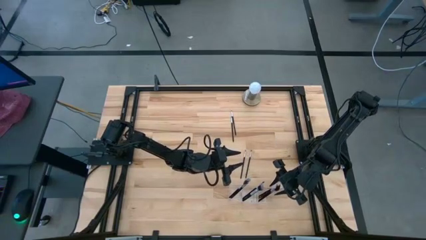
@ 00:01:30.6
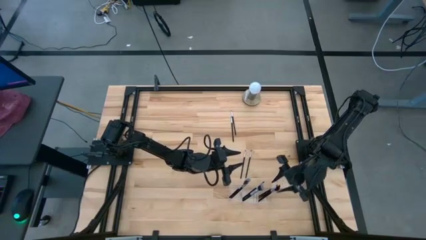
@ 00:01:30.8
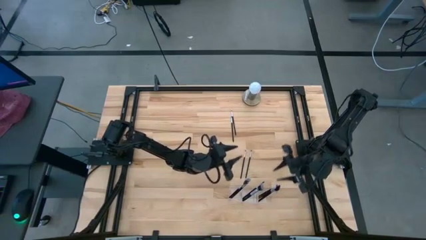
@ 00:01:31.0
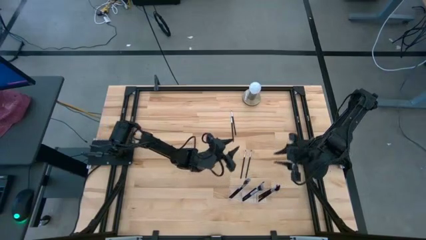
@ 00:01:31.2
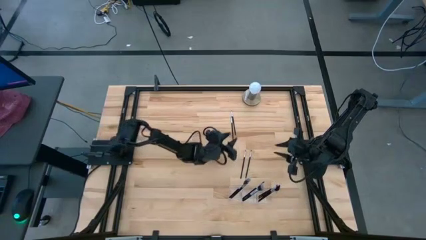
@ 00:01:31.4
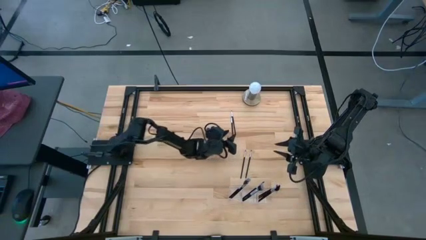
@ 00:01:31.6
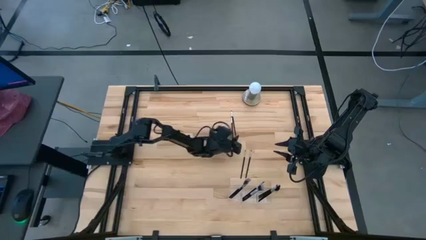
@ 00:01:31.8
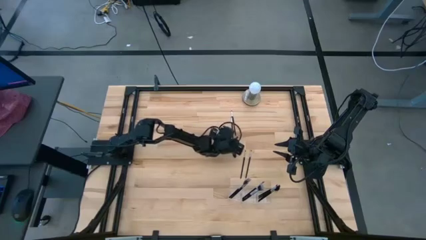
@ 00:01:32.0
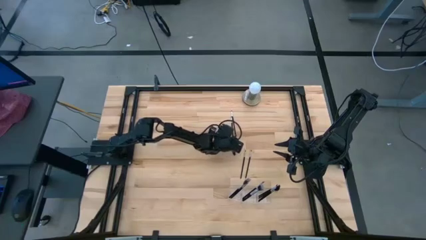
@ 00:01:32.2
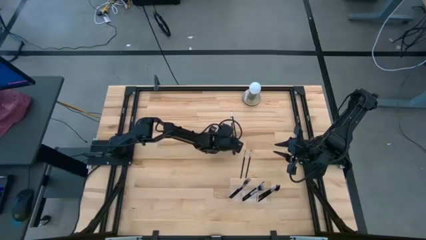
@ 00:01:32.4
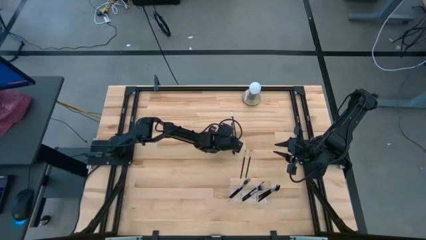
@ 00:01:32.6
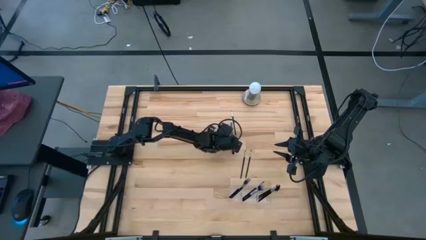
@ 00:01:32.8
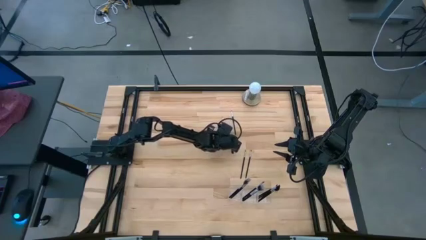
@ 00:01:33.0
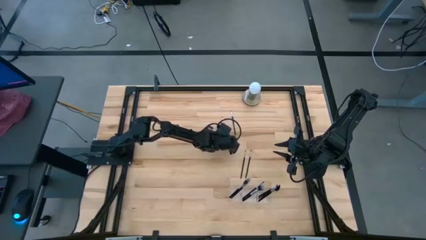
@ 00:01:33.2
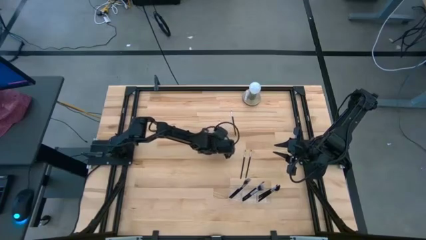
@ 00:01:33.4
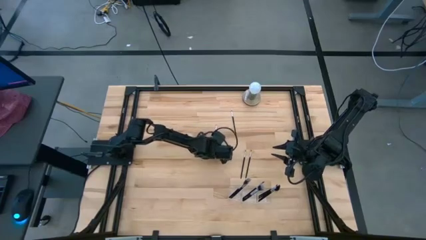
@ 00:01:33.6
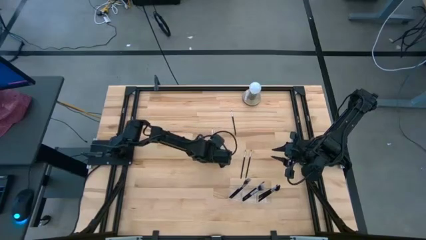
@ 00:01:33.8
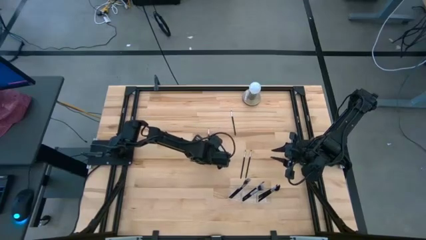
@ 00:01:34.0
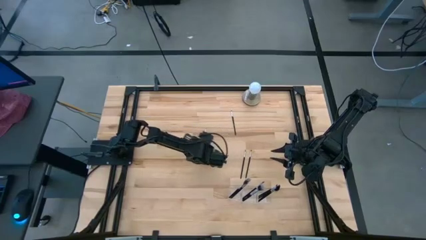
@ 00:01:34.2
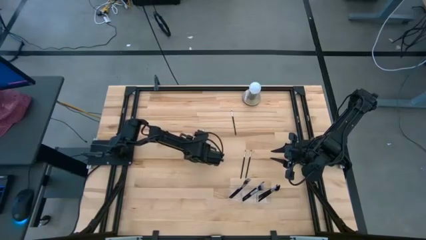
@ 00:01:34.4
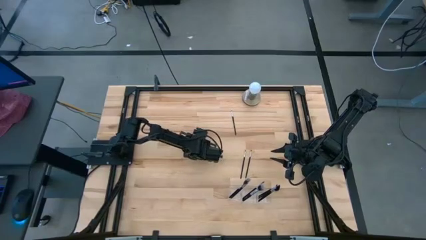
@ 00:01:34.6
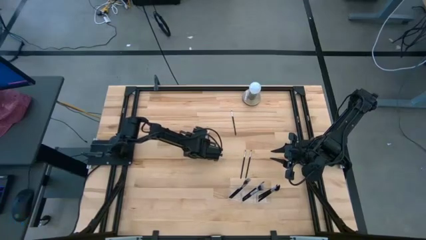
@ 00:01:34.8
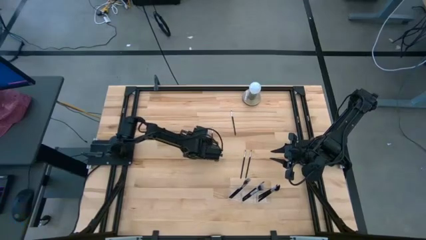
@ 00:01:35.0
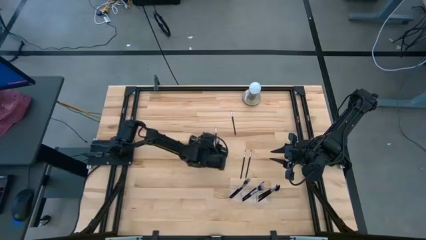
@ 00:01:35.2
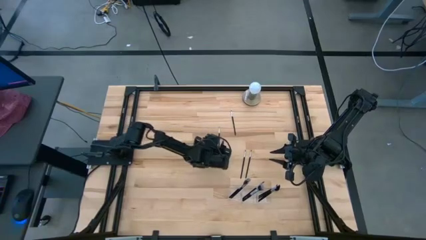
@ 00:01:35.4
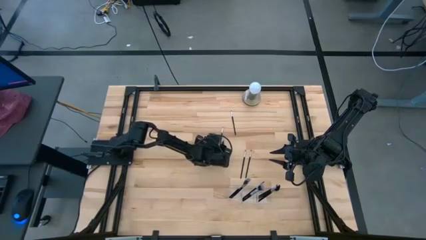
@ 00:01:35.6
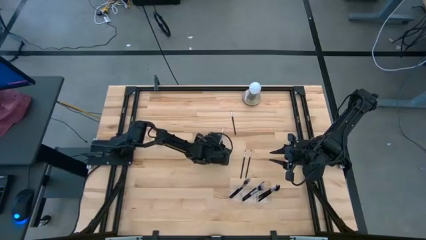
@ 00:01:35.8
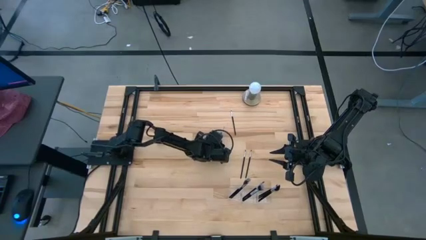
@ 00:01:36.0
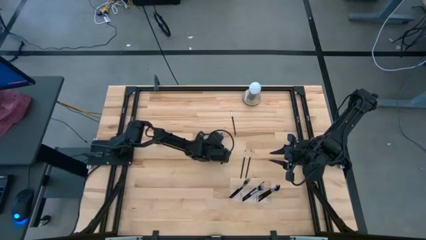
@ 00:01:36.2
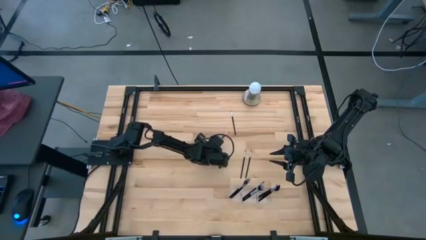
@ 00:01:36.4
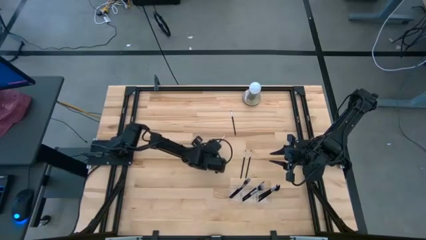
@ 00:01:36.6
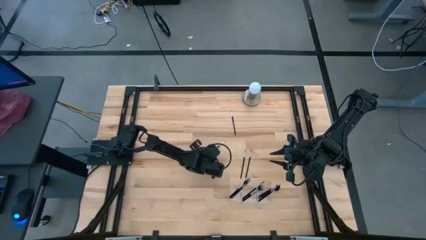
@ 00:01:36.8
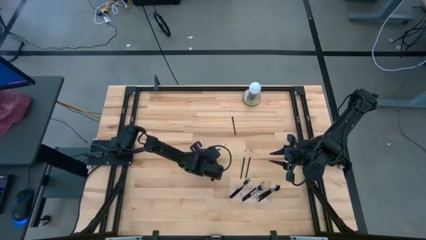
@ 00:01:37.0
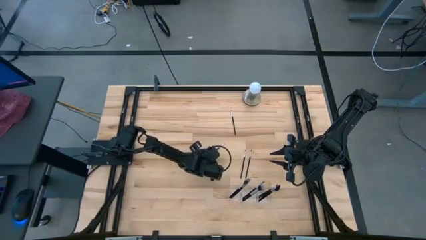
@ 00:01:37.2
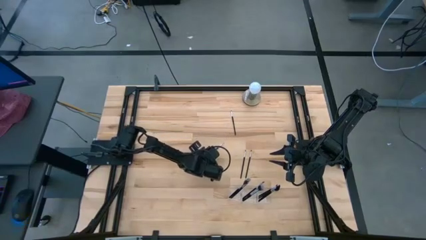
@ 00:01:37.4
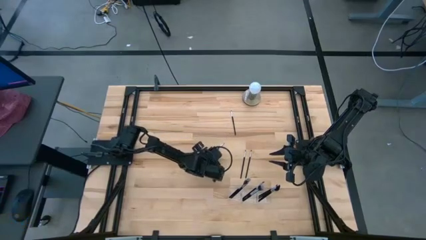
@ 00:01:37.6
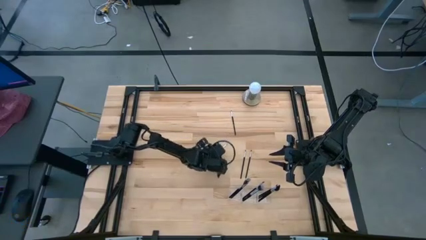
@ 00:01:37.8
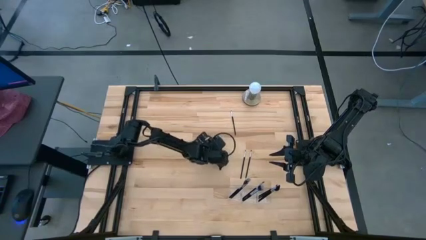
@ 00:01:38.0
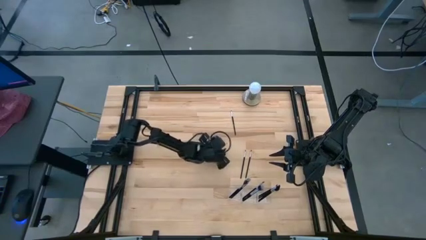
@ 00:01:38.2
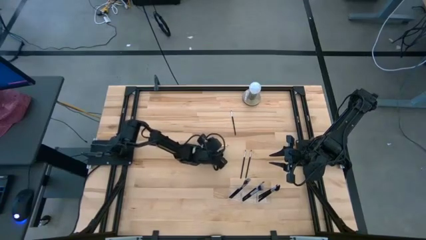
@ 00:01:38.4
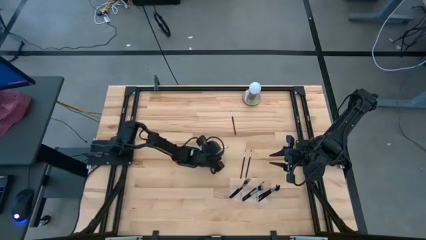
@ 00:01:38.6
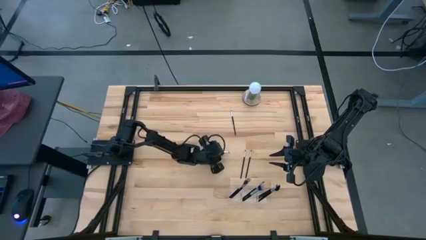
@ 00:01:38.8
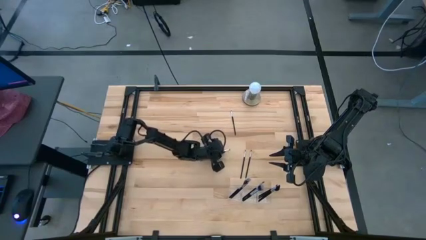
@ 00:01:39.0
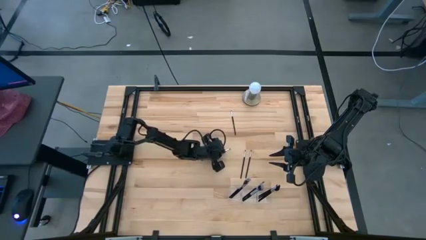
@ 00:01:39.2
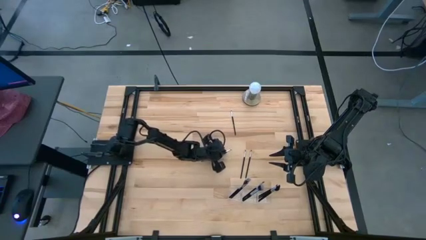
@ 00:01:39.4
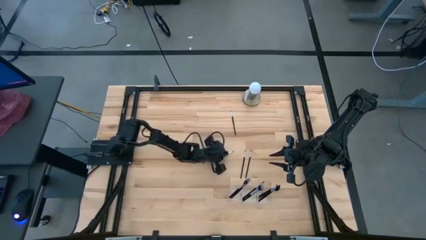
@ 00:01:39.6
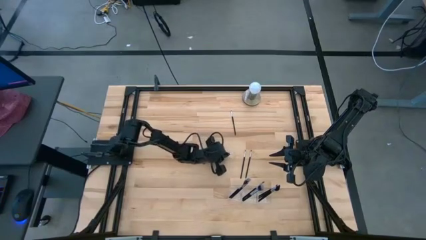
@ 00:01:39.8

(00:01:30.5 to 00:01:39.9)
Task: Put items in baskets/containers
Put the eyeshadow brush into the left section of the transparent organizer

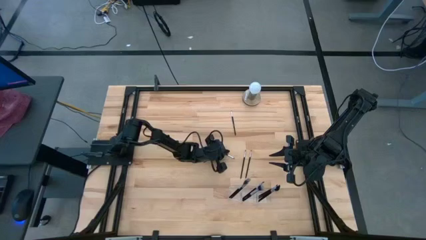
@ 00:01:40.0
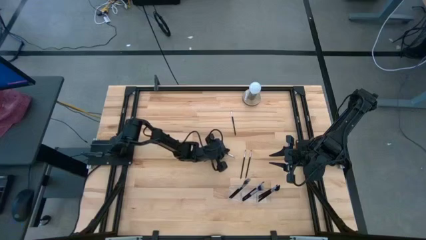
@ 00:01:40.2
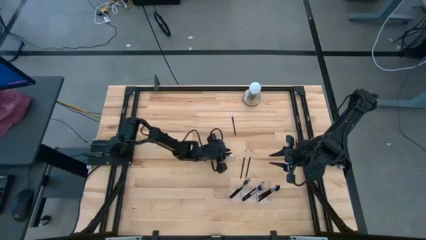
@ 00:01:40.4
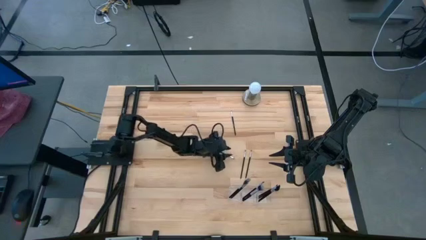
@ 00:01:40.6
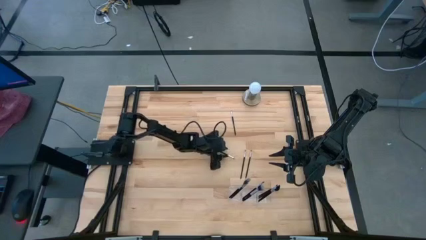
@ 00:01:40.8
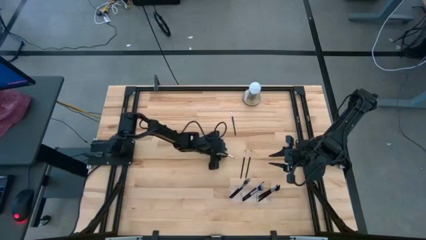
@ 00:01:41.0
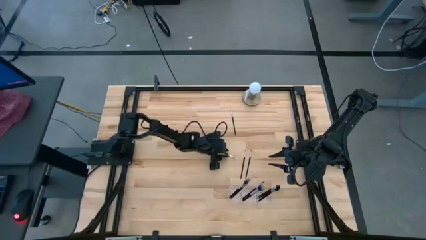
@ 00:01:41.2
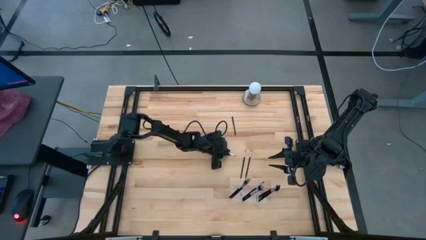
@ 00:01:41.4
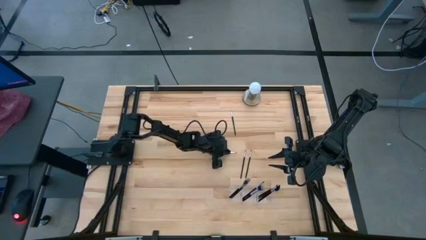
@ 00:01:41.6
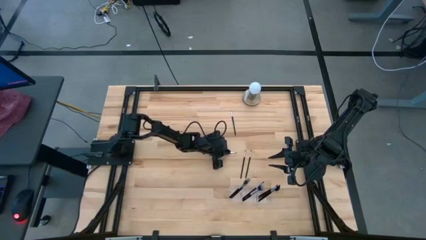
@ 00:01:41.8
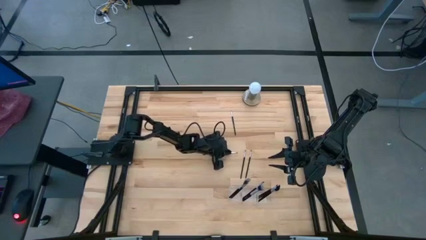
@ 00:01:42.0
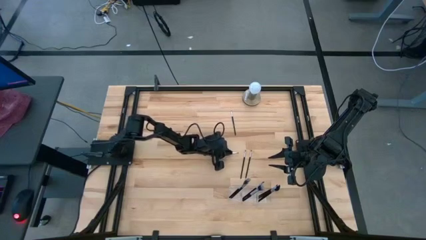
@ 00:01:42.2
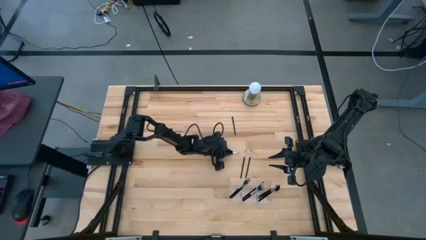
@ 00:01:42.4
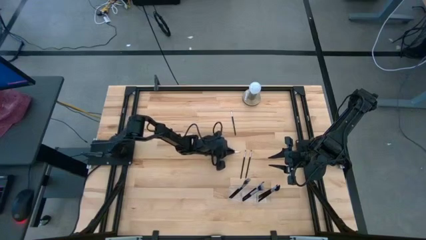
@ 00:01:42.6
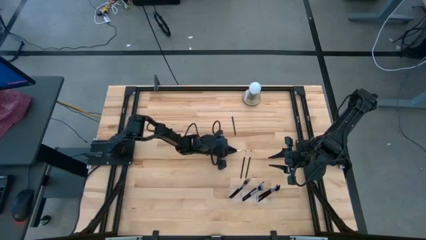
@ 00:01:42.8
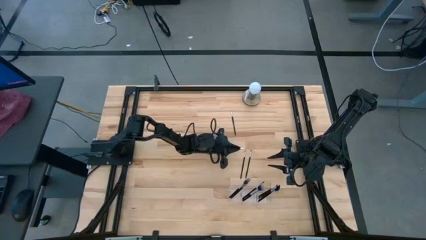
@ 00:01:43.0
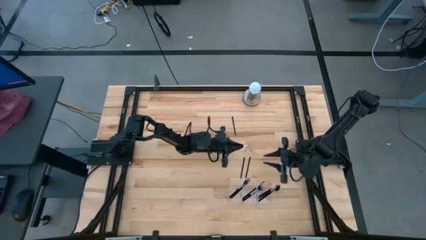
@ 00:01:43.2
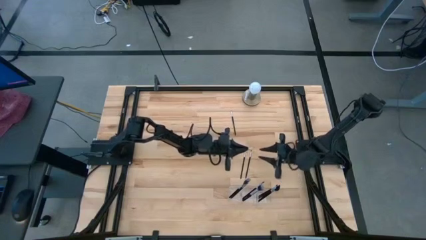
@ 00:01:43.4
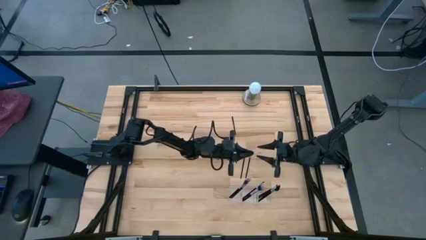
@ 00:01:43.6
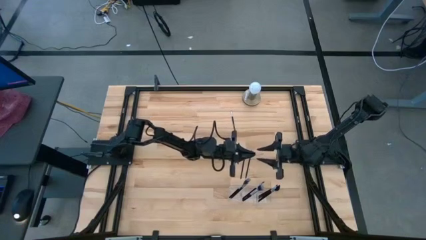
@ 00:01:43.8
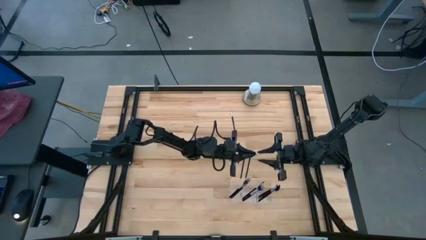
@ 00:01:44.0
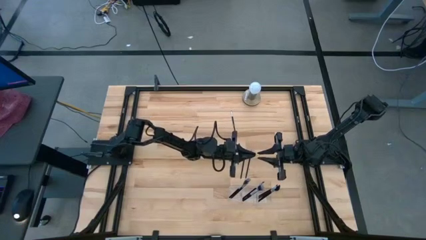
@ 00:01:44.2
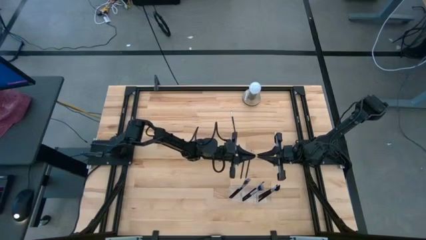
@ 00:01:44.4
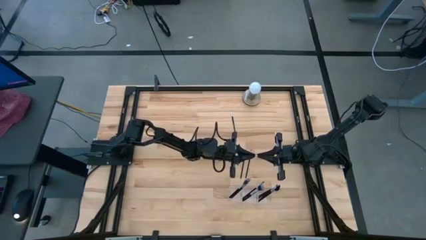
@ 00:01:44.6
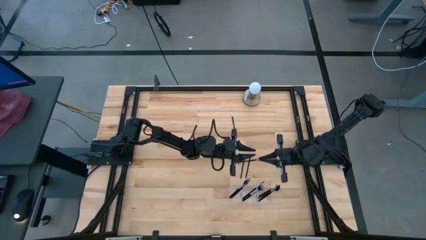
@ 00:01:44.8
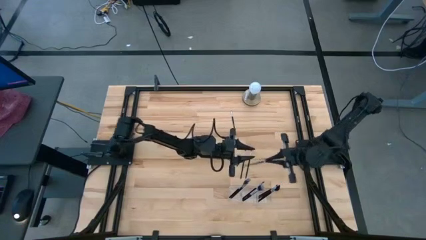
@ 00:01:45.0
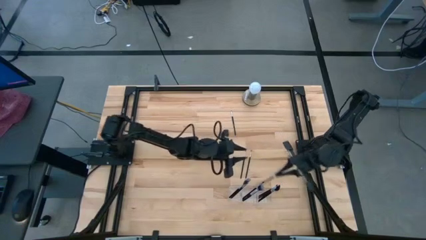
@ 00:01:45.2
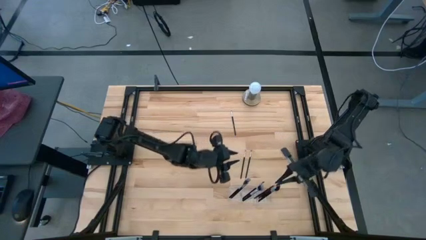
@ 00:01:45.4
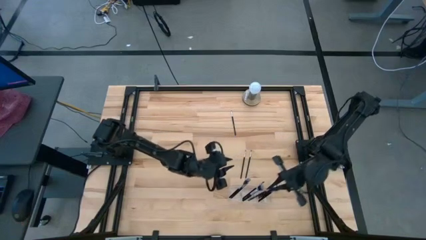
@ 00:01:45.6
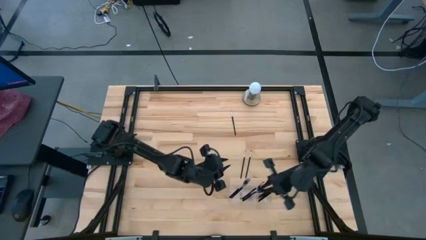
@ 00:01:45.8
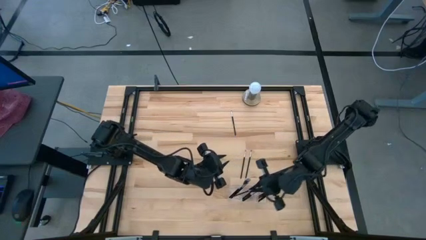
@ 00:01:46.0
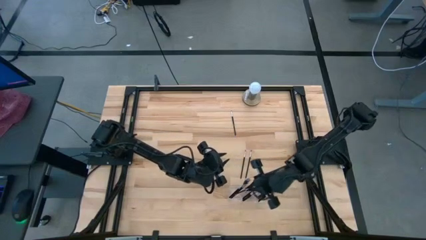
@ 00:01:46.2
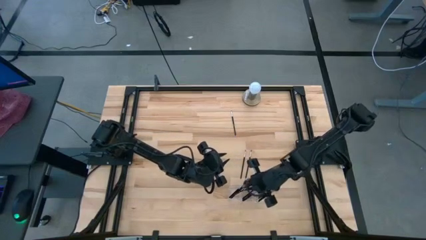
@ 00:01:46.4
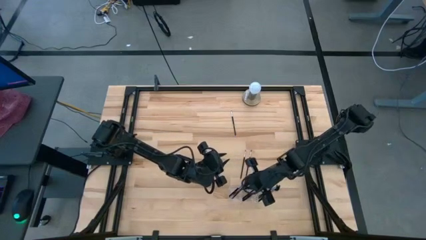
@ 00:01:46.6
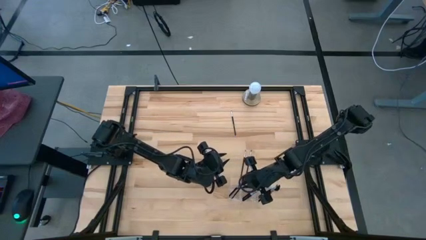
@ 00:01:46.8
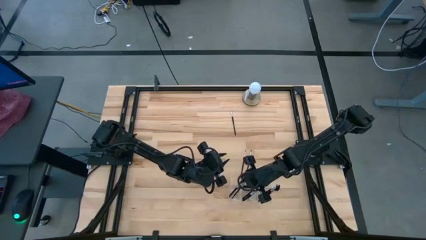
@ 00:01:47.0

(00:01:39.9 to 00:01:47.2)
Put the eyeshadow brush into the left section of the transparent organizer

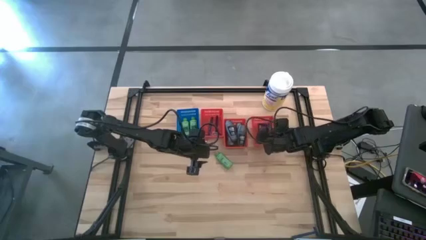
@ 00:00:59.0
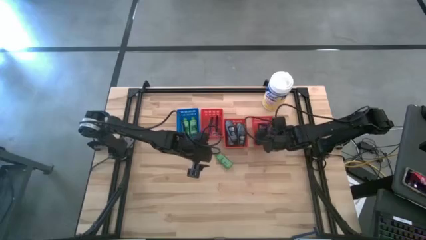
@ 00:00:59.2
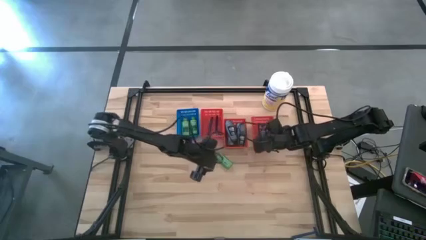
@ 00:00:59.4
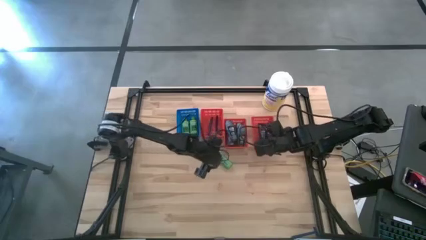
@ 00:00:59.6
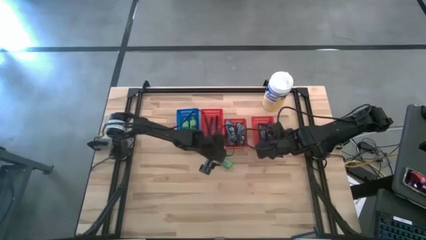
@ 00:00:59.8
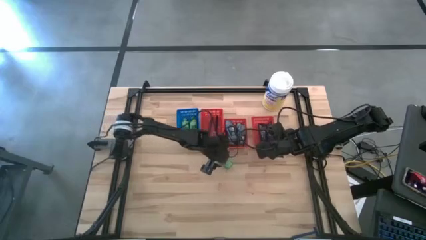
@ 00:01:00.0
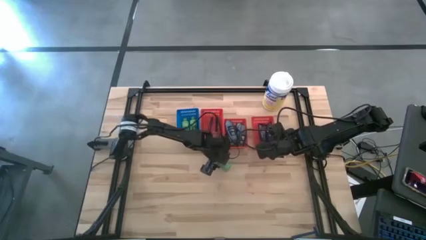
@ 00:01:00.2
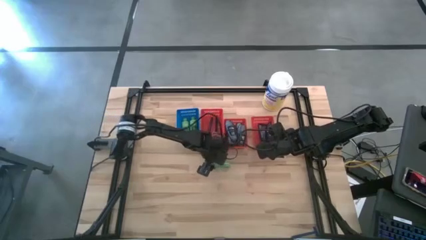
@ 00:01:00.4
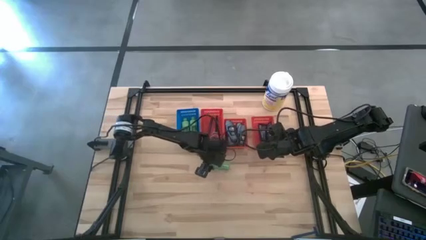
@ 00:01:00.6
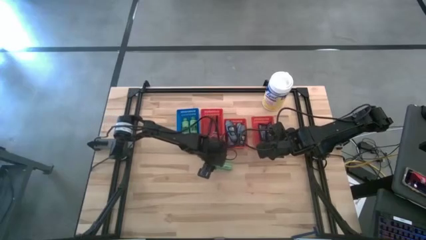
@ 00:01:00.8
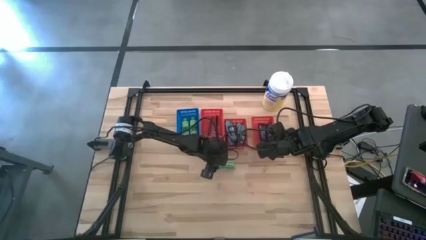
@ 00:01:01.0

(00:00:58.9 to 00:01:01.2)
Task: Pick & Place Travel size toiletries
Put the green shampoo into the blue bin
